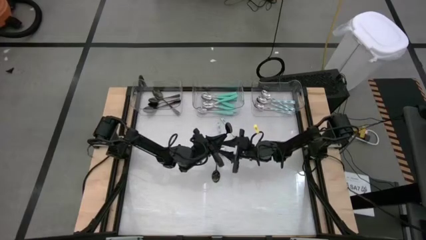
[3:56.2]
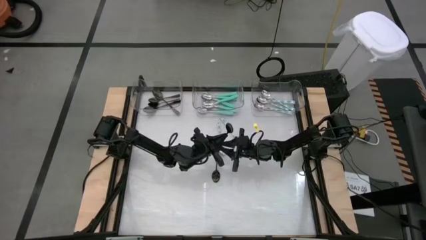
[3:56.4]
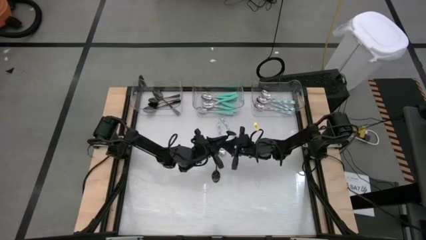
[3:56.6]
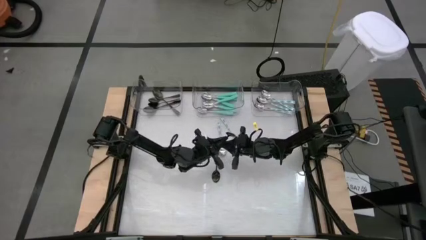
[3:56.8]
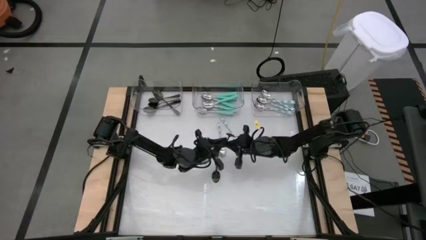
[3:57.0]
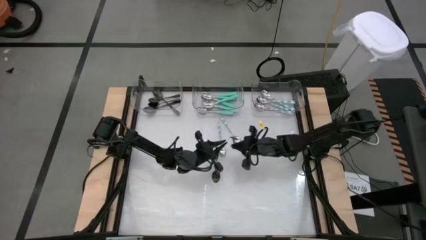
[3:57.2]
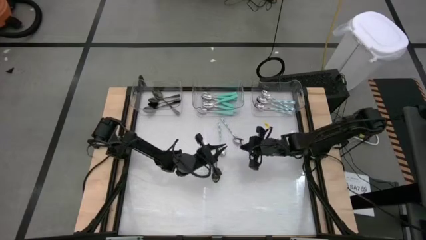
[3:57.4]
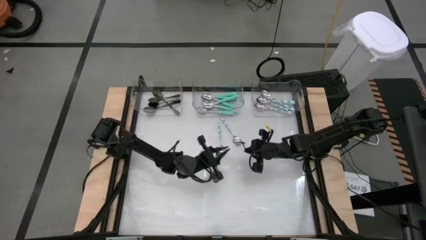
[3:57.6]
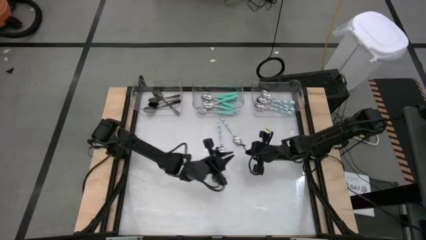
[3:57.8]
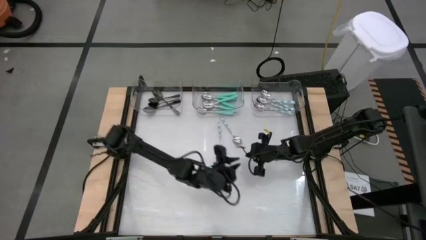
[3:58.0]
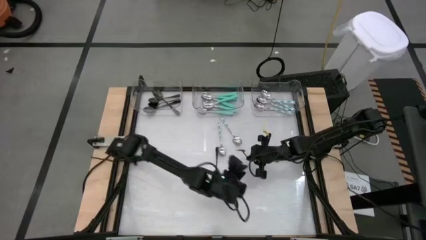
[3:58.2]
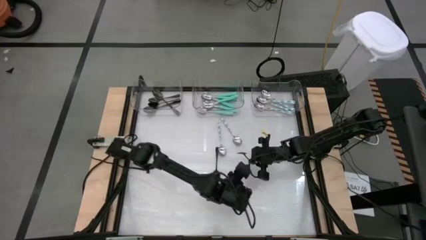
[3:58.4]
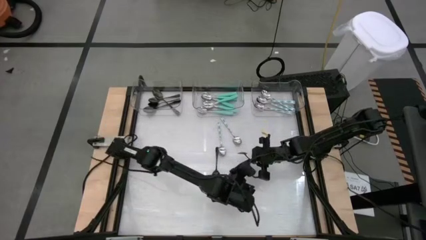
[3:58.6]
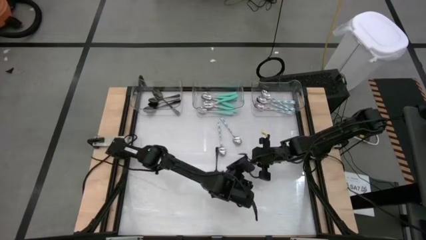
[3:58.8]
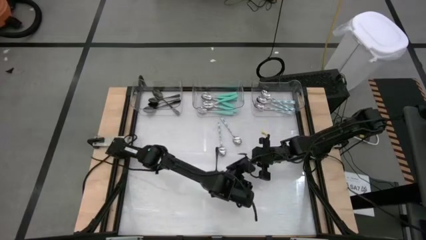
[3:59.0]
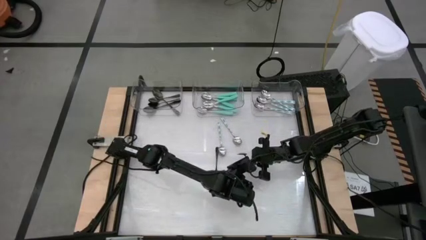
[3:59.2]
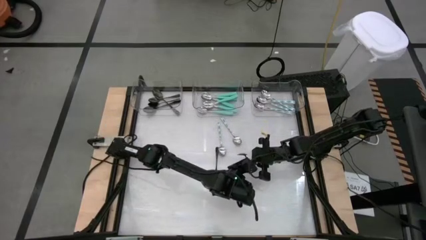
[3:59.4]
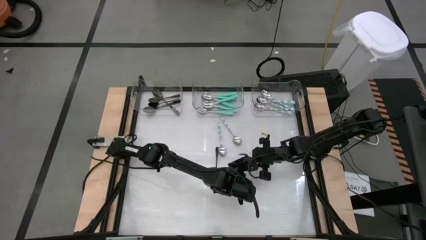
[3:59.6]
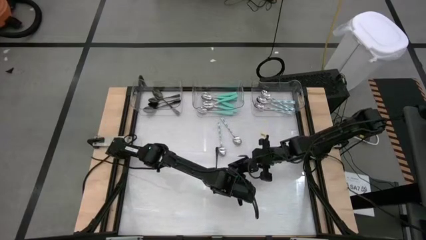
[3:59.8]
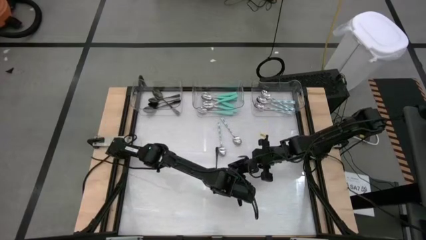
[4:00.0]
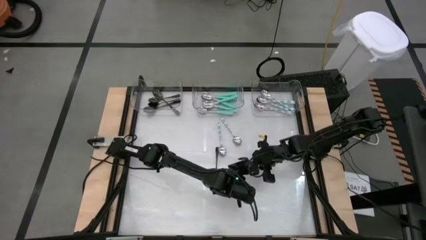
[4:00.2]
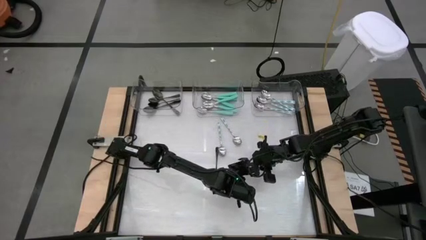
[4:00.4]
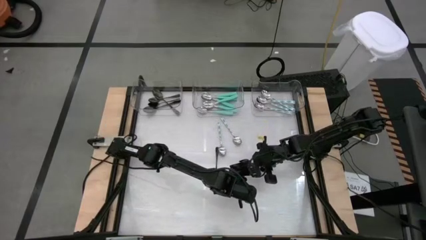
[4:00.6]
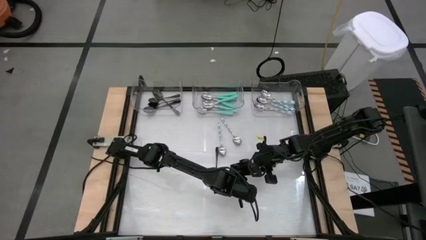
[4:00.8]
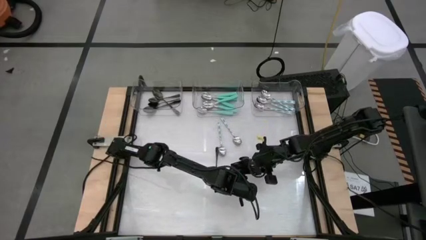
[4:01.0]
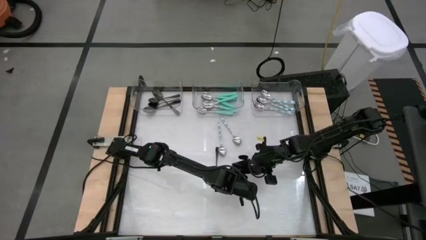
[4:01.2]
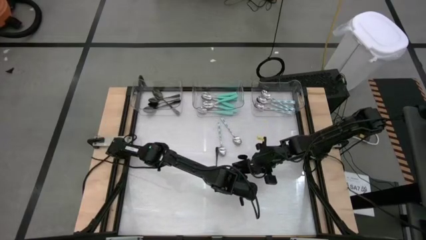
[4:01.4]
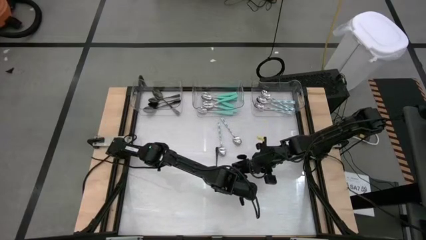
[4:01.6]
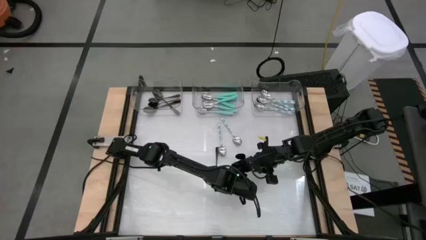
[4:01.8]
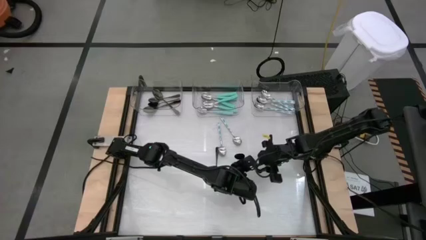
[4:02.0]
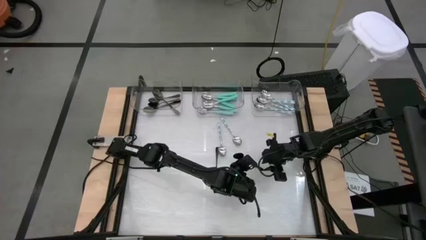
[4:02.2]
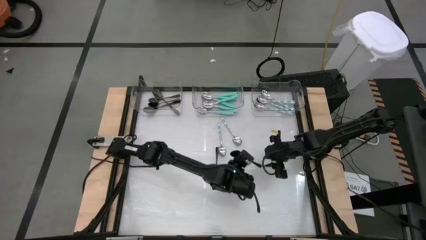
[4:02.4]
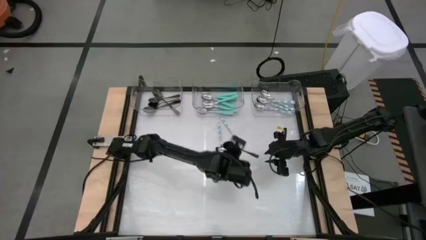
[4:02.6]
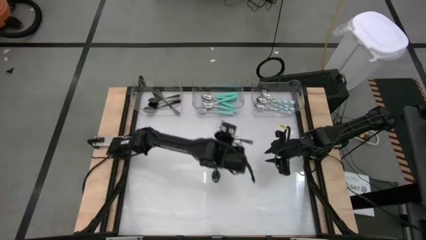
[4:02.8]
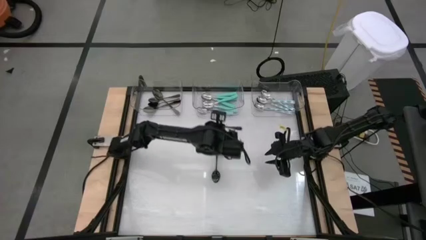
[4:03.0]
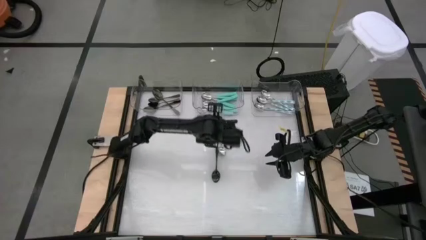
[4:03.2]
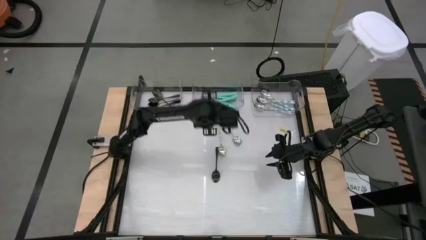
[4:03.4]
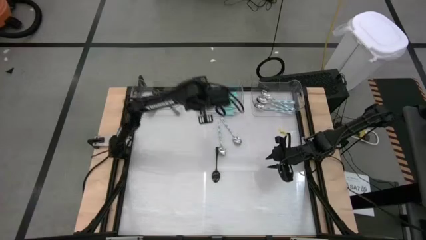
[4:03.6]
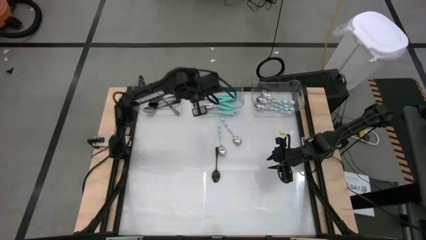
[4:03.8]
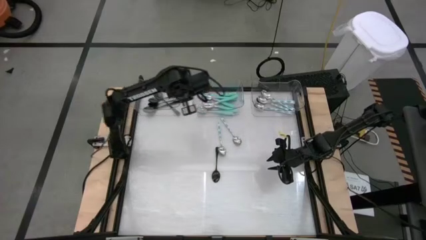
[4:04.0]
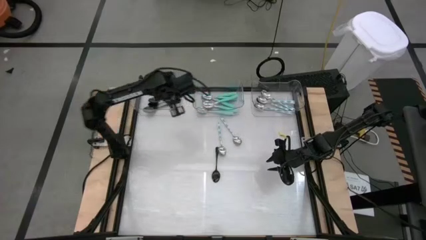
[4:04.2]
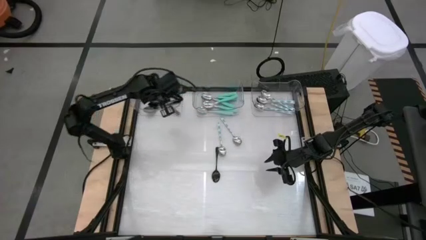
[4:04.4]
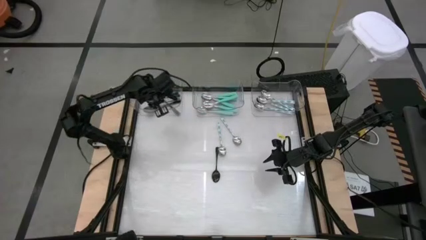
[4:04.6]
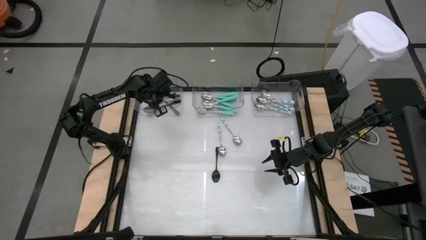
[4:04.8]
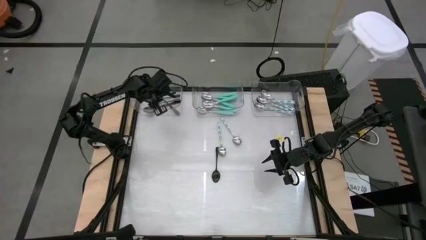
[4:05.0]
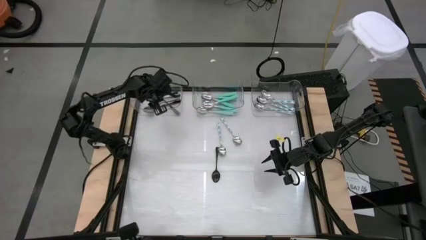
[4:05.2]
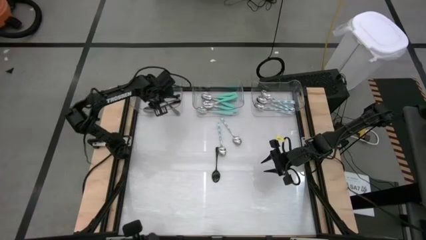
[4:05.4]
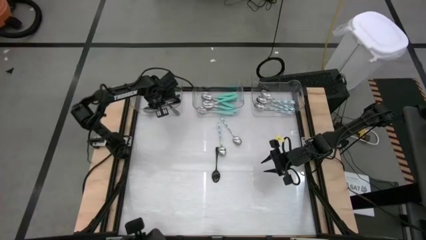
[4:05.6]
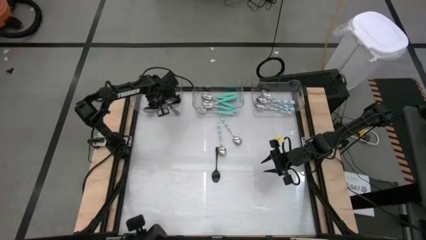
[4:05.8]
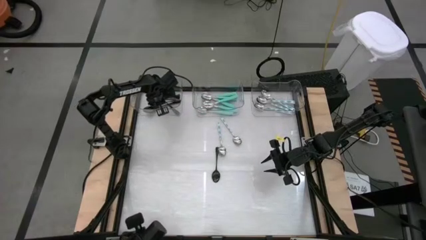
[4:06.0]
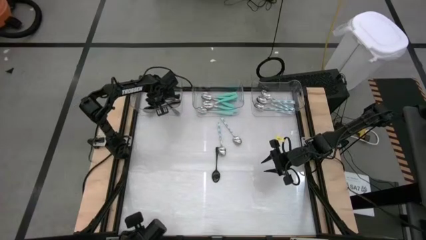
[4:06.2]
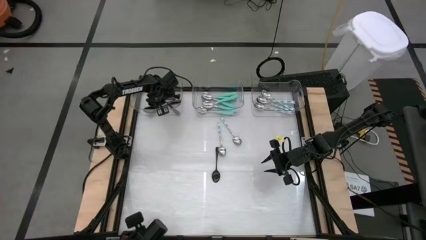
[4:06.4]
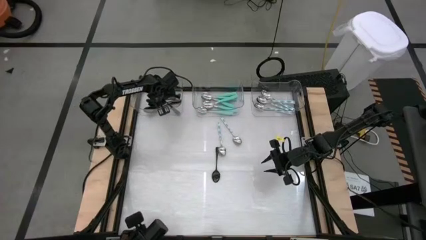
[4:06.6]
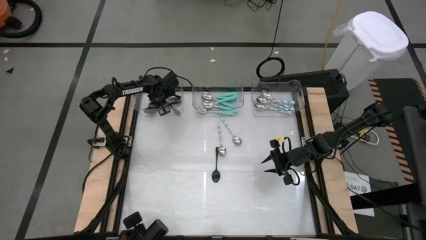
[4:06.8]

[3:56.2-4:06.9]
Task: Sort silverware by color (type)
Put the black spoon into the left transparent bin

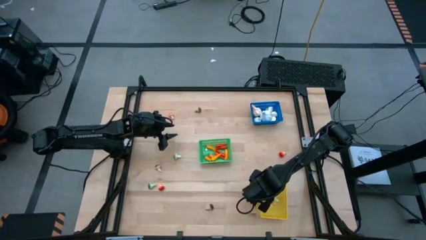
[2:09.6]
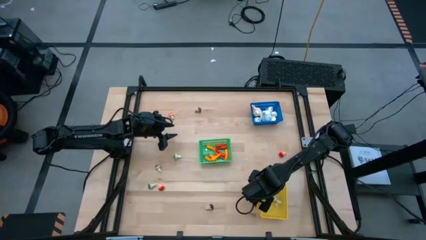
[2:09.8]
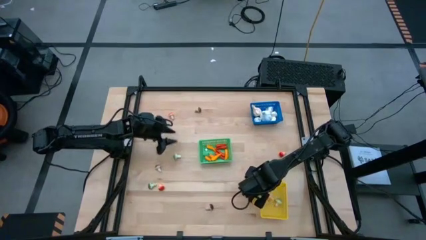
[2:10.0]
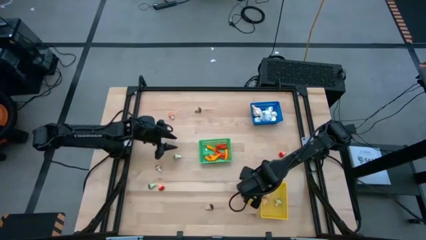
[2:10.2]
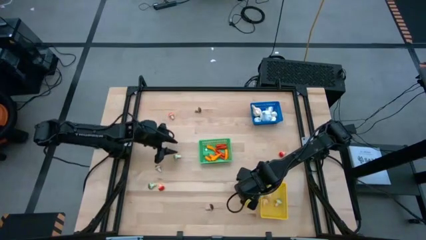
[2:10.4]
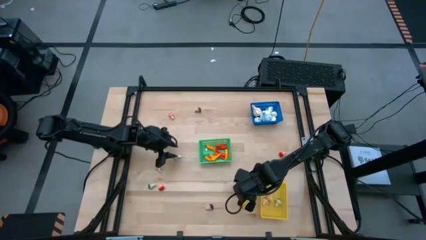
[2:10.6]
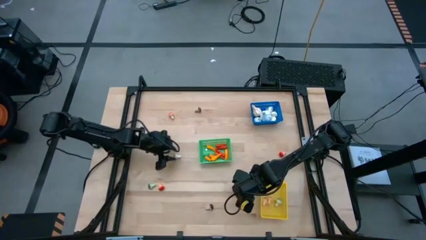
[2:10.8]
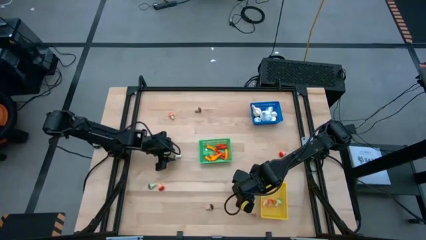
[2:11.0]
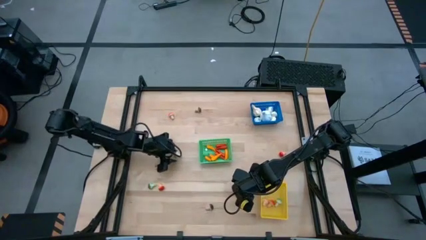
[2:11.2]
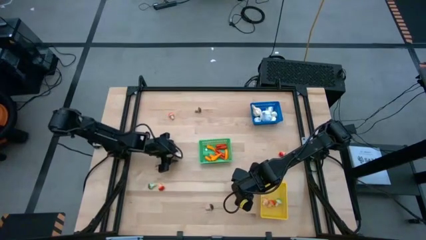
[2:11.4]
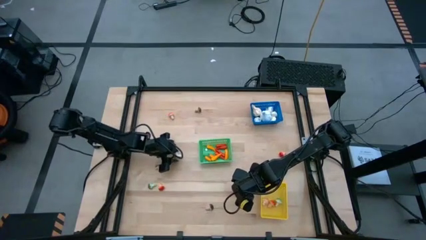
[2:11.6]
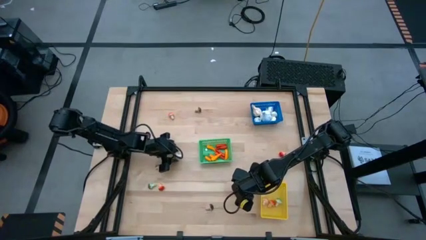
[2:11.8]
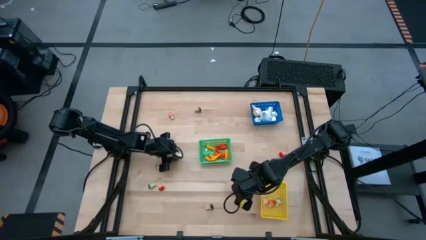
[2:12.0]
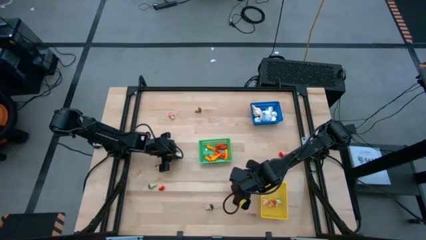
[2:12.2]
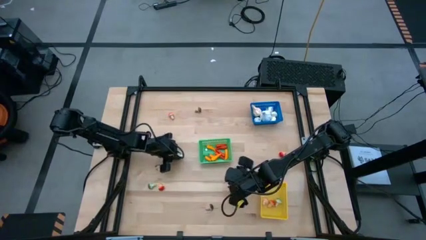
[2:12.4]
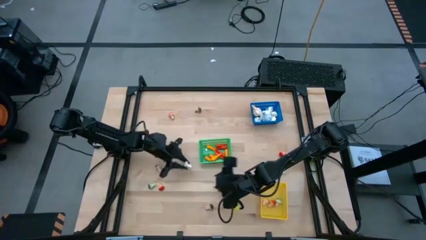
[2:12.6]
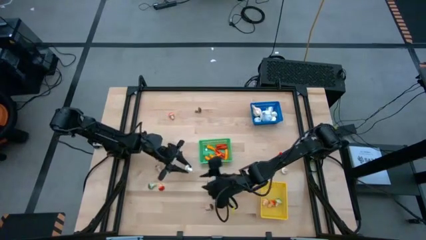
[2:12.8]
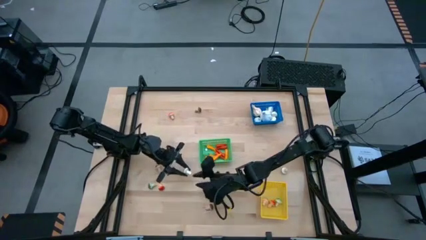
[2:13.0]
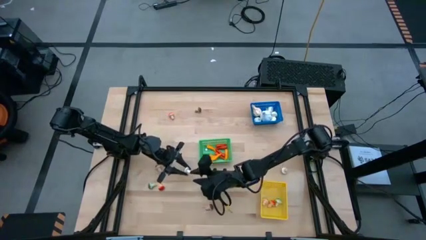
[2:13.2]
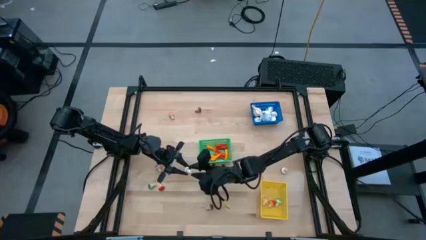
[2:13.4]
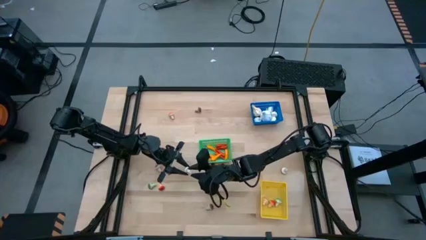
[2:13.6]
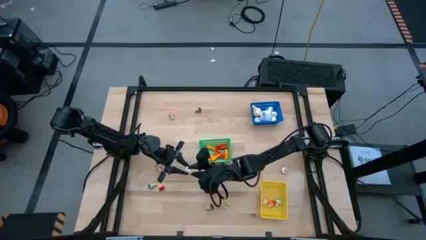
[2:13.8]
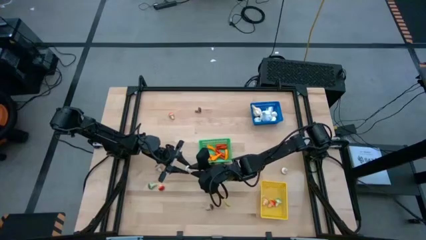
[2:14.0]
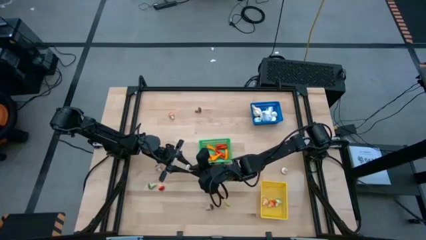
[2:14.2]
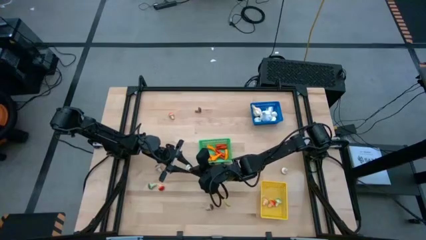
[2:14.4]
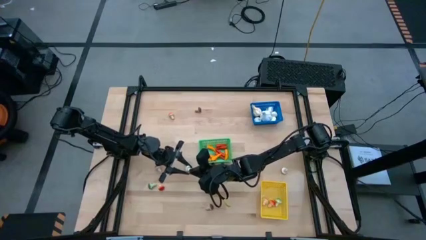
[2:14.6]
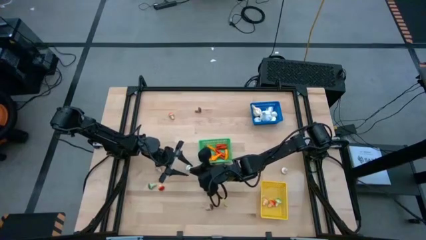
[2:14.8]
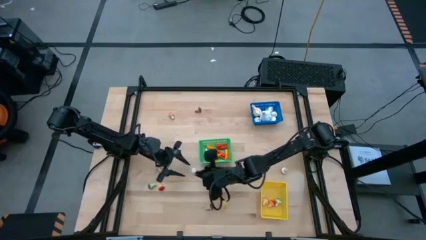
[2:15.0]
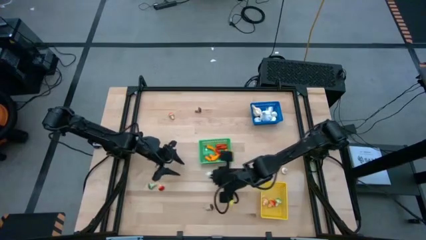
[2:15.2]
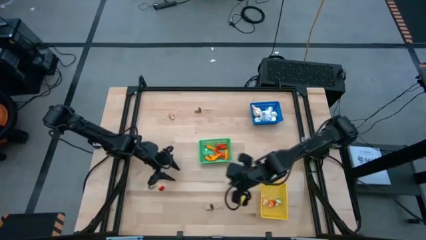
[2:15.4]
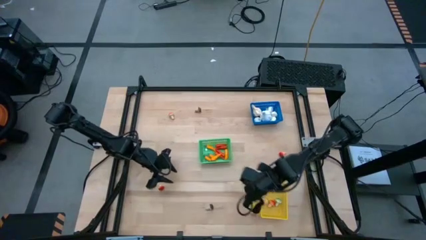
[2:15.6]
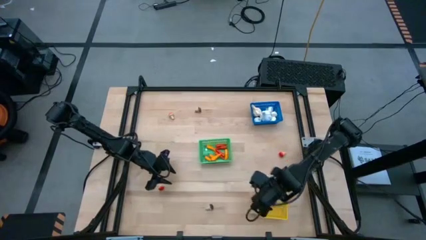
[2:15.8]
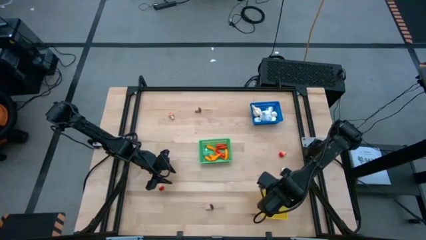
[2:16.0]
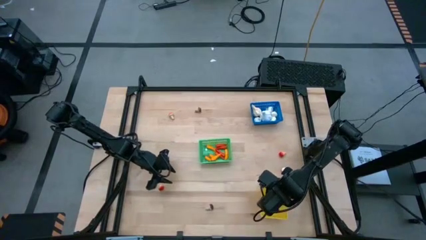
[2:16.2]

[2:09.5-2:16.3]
Task: Sort produce into baskets
Put the green mushroom into the yellow bin
